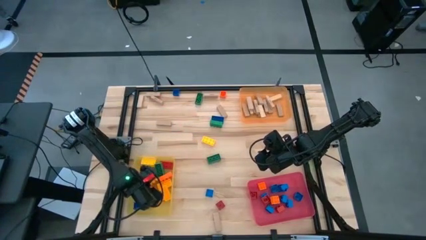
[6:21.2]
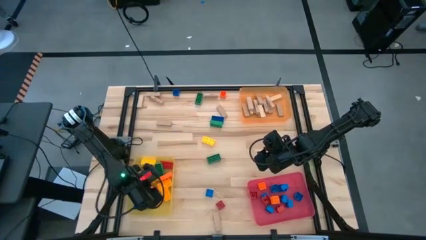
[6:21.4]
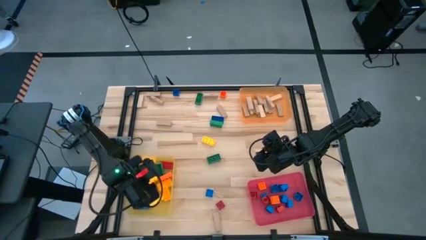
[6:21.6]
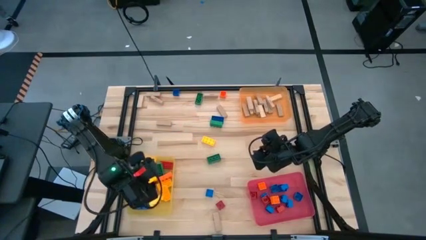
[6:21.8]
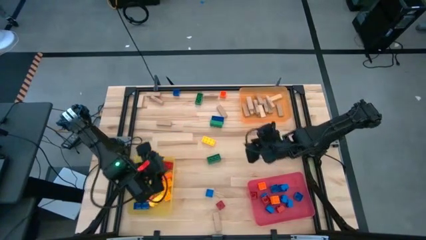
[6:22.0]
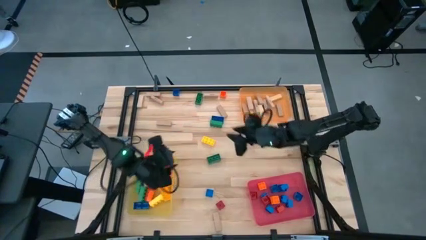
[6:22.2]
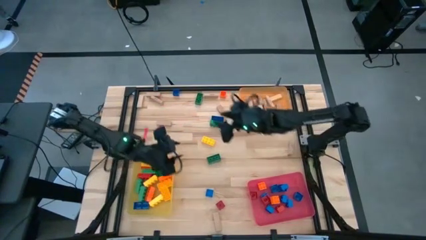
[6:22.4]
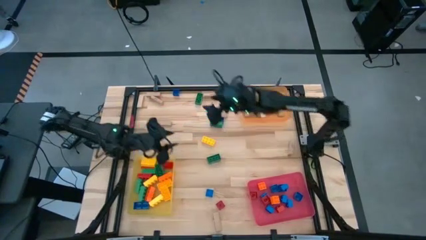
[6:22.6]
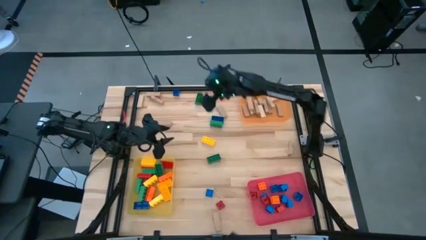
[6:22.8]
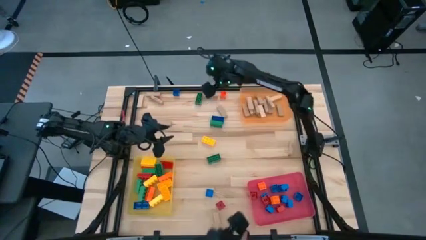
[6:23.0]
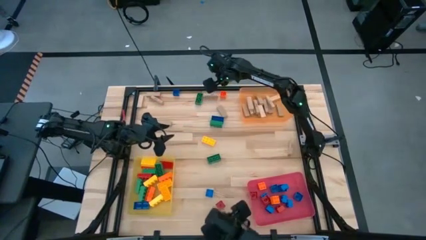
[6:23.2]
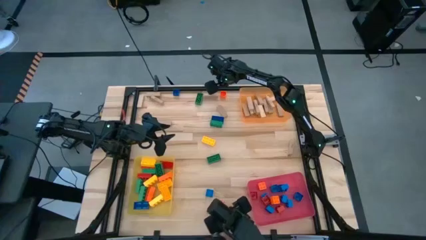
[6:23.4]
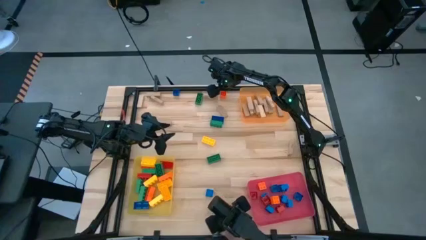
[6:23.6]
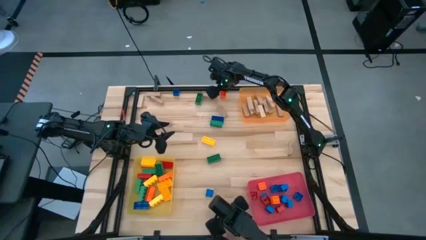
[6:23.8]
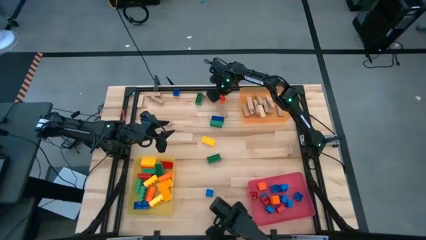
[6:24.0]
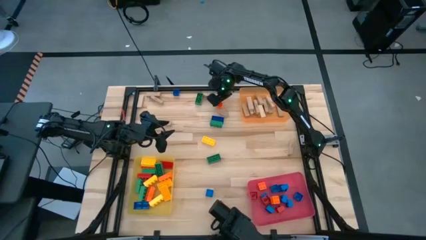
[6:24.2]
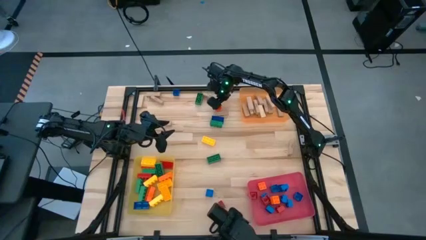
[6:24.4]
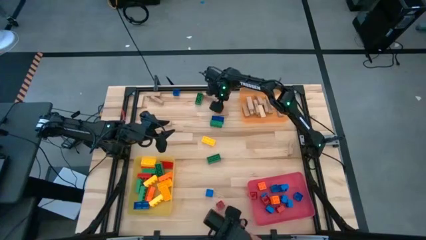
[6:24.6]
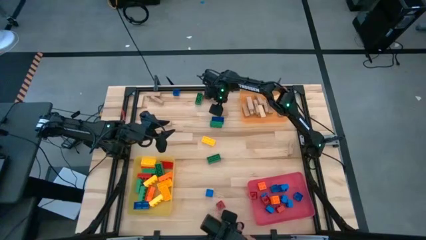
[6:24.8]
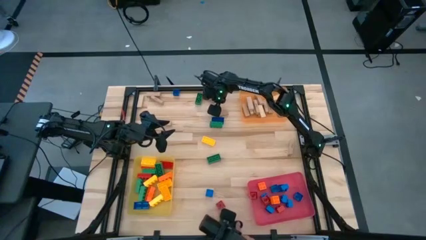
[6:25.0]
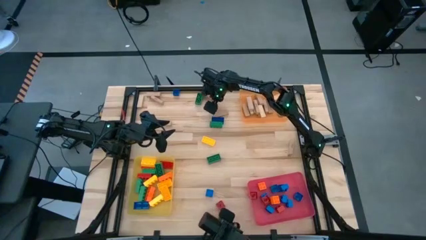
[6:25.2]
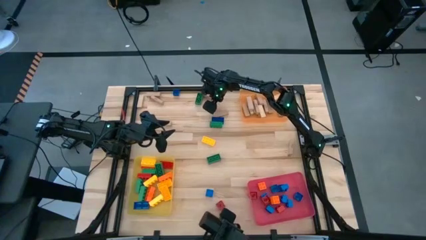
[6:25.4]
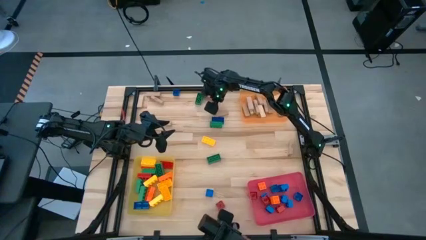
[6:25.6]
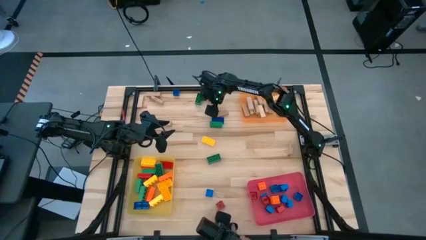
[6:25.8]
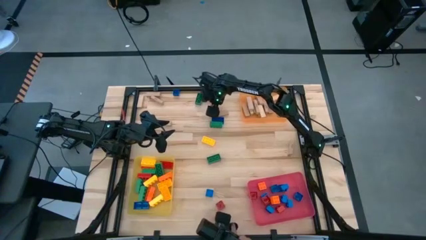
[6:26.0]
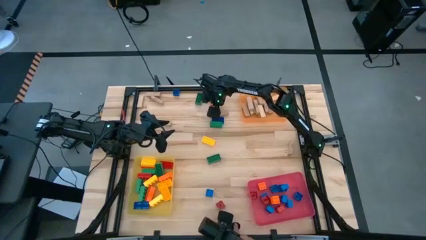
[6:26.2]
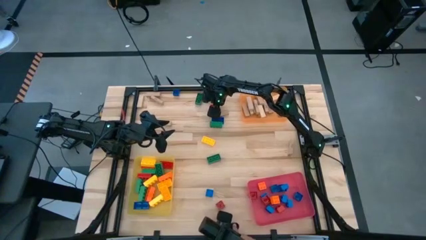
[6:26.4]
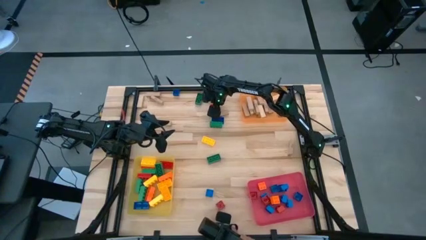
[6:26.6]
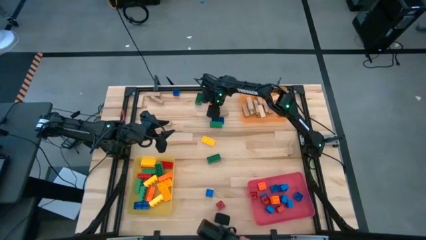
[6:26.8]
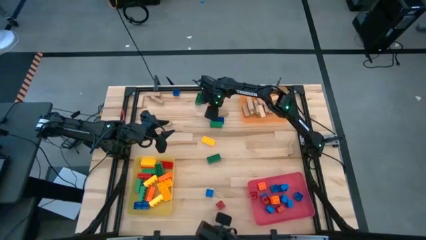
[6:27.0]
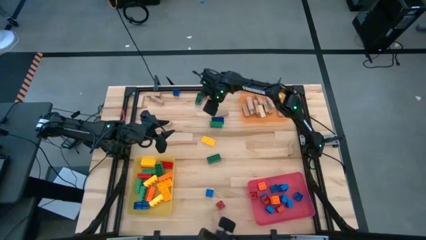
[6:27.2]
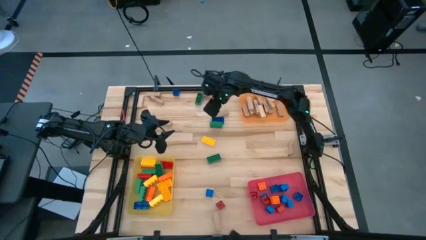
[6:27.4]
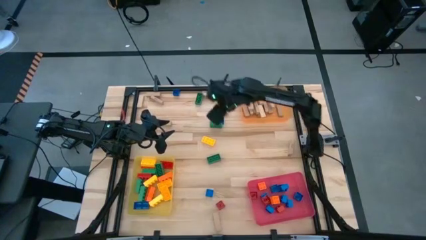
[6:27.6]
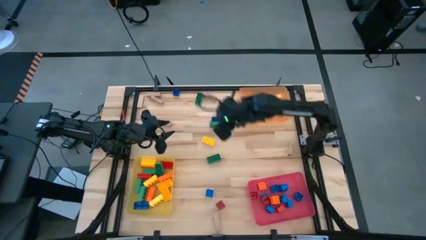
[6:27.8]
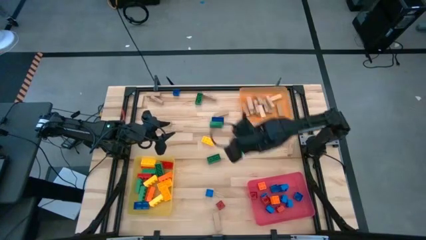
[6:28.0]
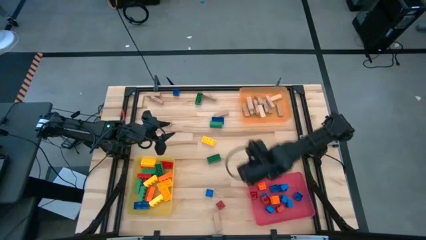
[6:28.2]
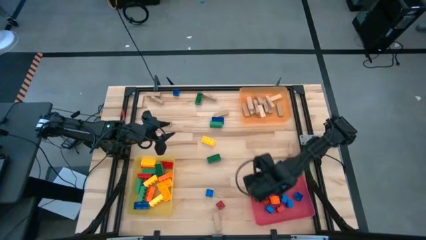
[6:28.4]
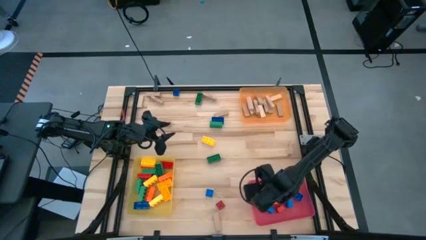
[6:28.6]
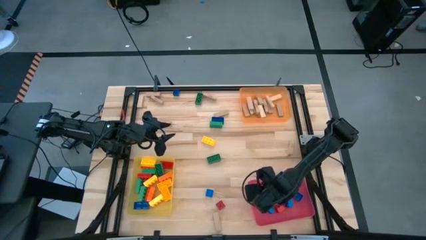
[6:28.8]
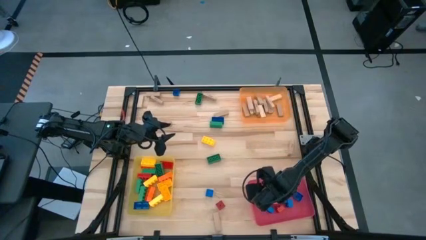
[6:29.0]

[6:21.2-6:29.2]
Task: Sort blocks by size
Put the small orange game piece into the red bin

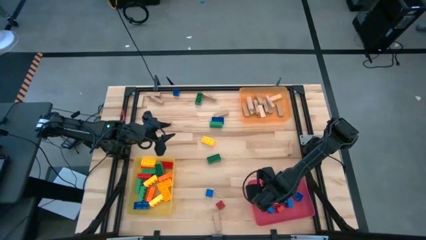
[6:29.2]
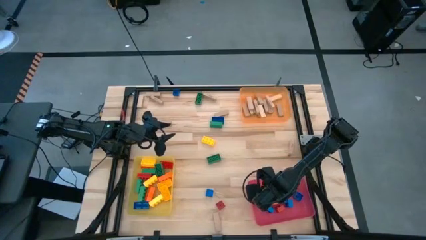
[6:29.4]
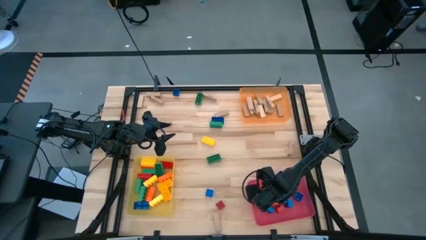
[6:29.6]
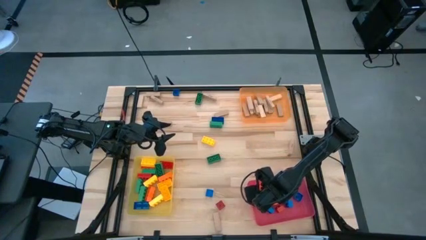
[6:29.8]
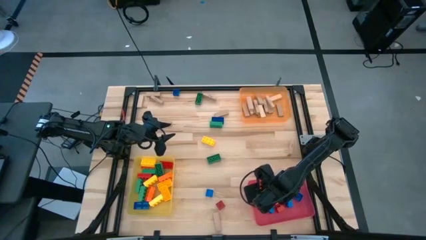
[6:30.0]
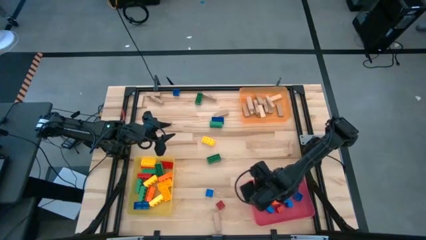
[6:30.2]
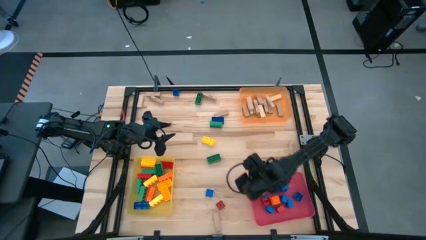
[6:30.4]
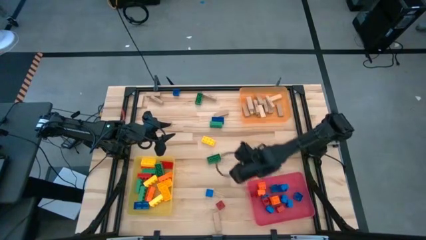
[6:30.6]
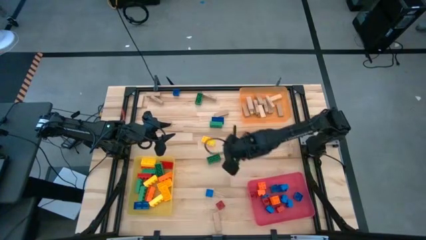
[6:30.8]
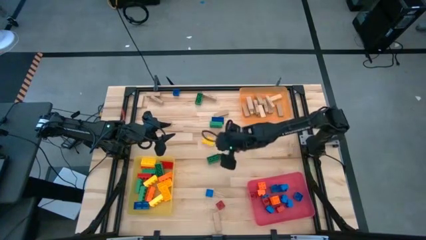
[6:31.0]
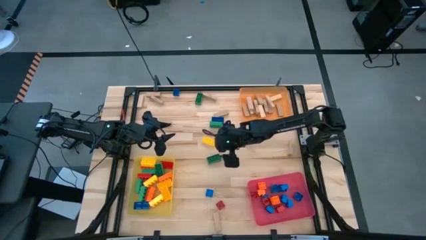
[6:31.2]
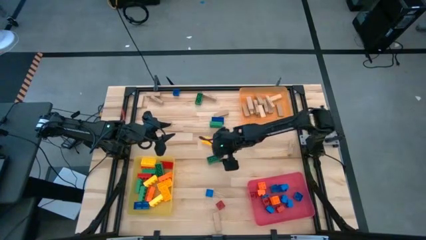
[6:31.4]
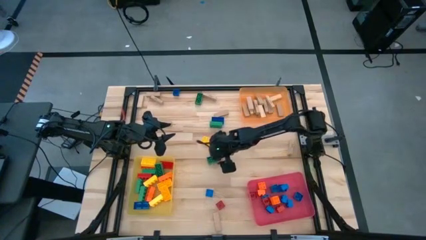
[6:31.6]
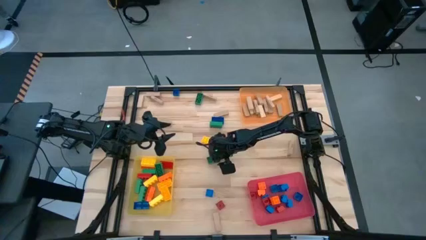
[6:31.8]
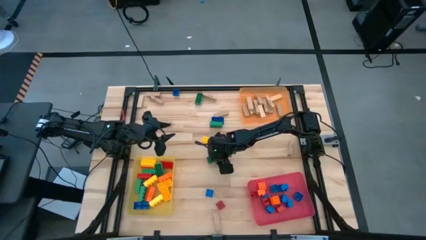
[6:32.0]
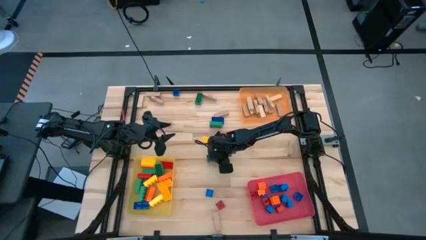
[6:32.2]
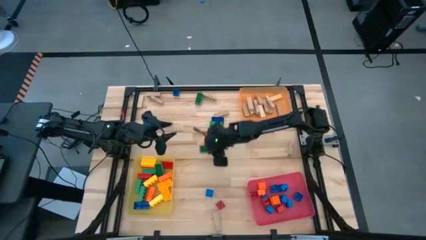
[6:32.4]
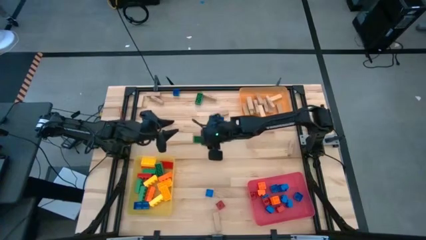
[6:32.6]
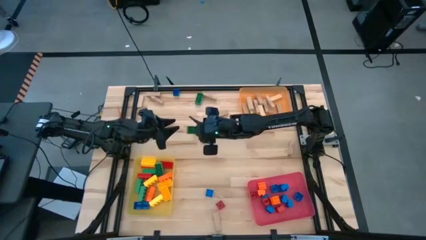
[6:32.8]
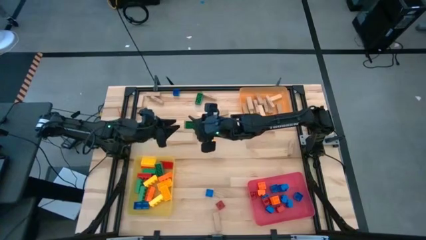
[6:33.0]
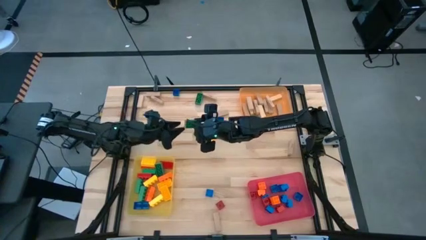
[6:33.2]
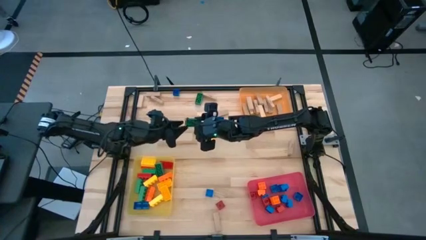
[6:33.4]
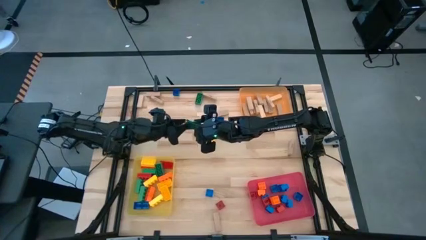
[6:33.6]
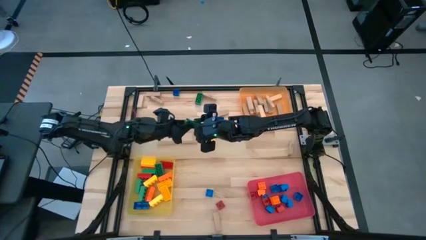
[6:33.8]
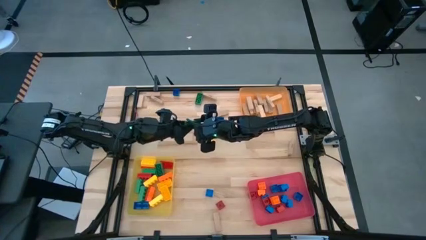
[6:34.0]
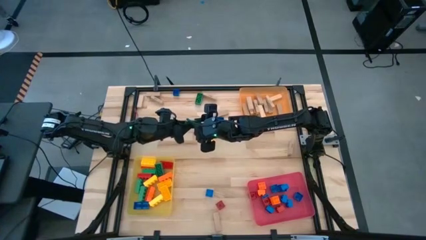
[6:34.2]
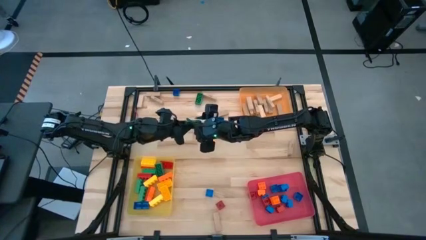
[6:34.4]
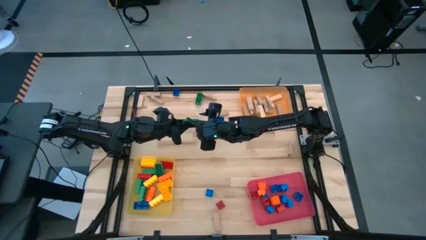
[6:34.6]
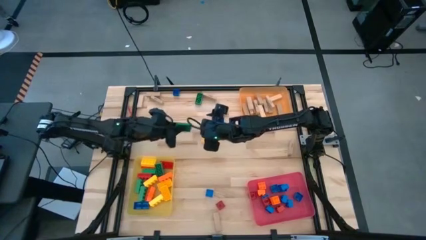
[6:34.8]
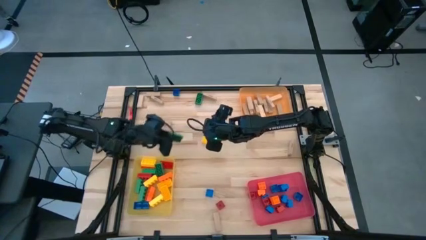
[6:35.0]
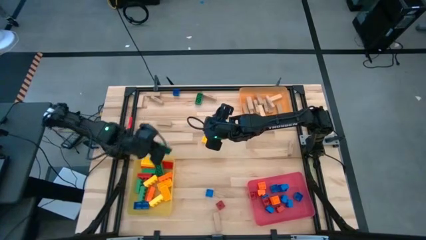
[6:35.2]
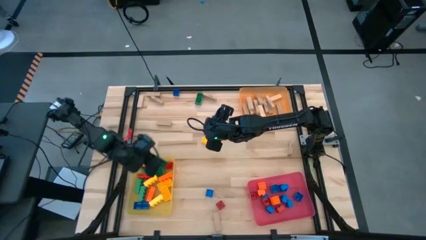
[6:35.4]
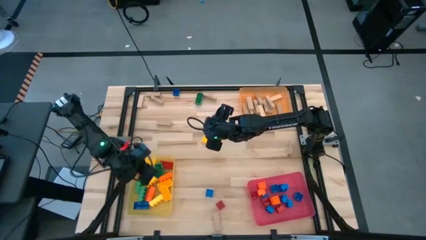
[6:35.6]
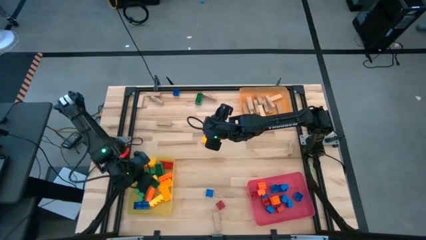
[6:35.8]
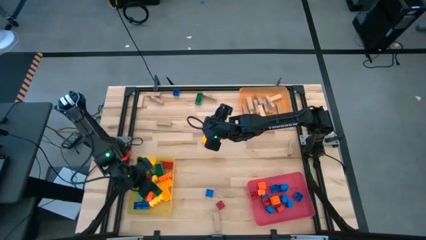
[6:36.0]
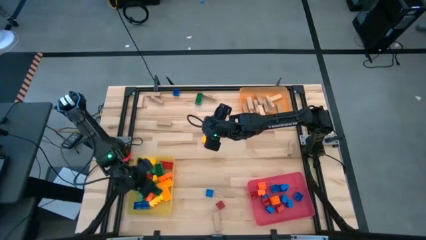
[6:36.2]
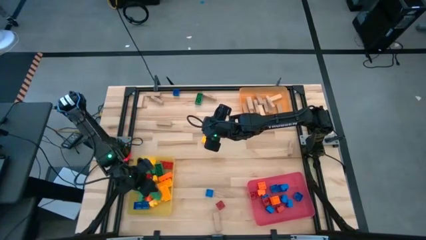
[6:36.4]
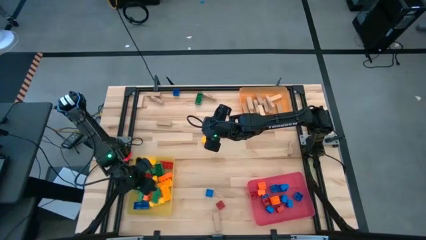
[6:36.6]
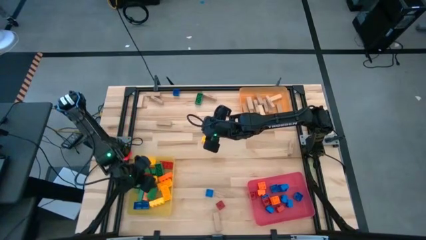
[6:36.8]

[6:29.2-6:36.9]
Put the large green game piece into the yellow bin
